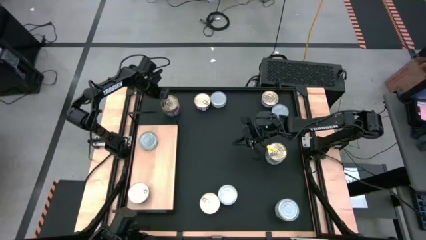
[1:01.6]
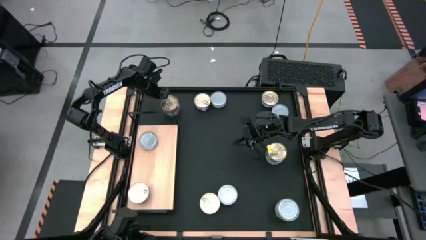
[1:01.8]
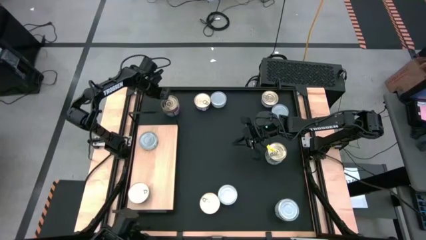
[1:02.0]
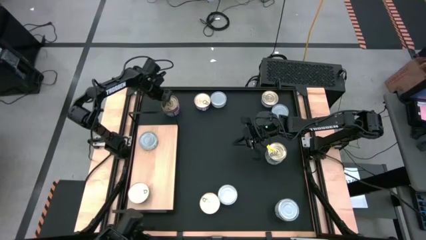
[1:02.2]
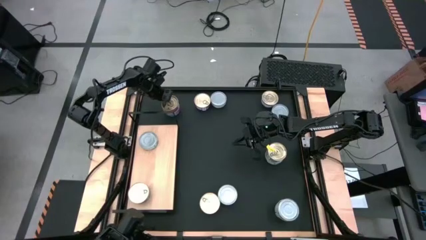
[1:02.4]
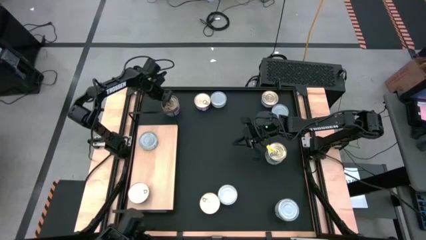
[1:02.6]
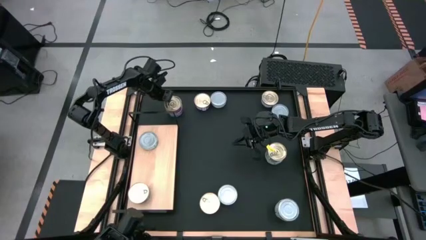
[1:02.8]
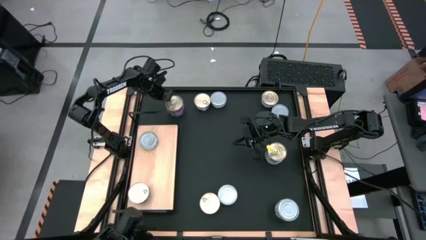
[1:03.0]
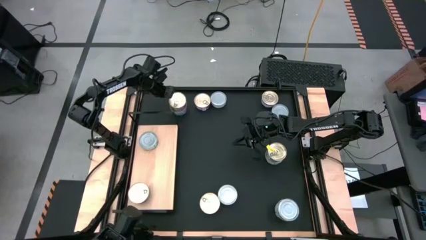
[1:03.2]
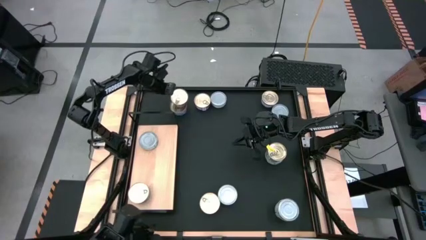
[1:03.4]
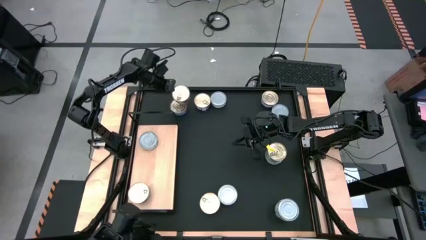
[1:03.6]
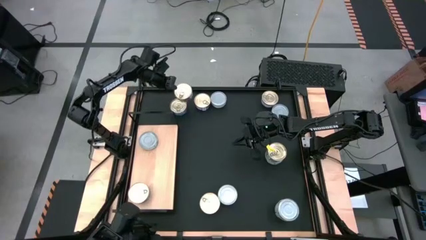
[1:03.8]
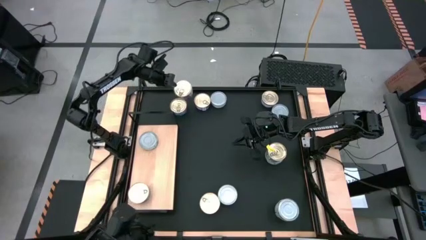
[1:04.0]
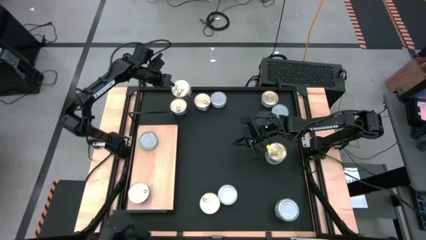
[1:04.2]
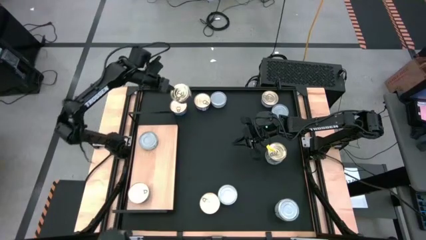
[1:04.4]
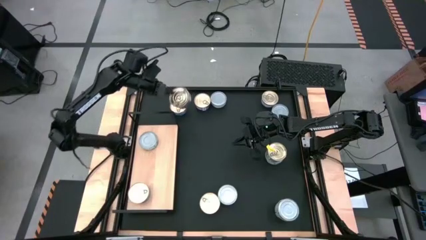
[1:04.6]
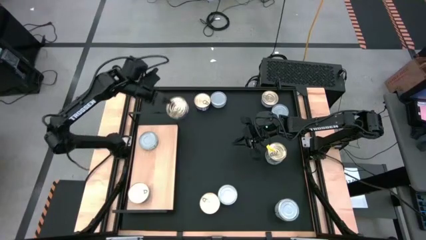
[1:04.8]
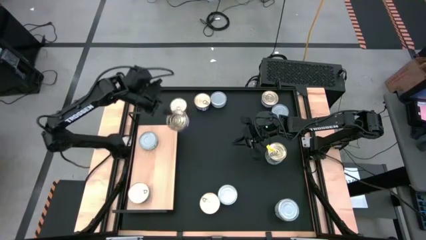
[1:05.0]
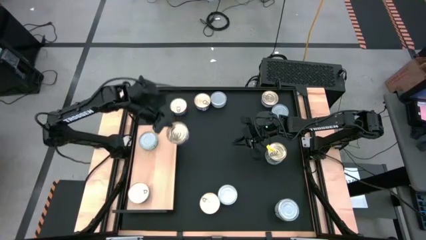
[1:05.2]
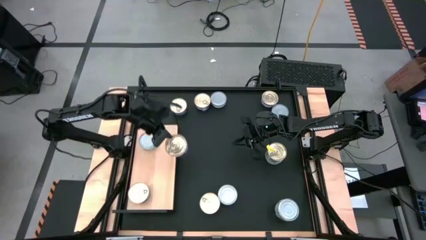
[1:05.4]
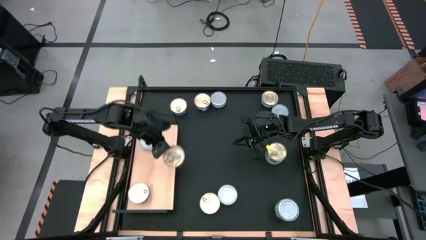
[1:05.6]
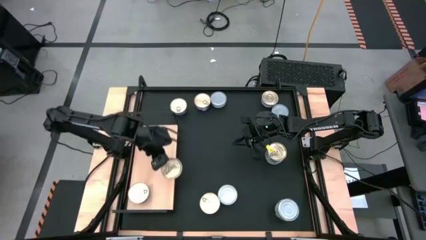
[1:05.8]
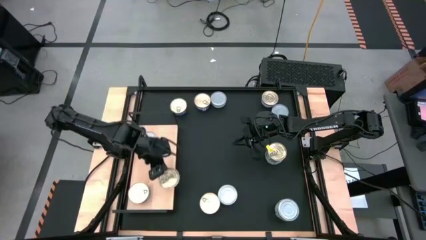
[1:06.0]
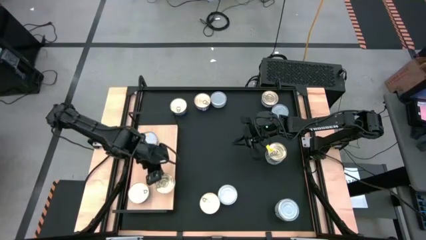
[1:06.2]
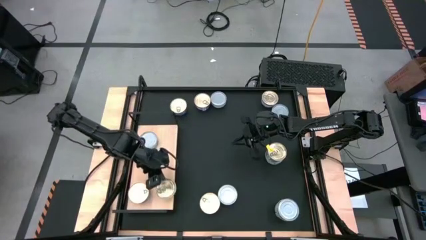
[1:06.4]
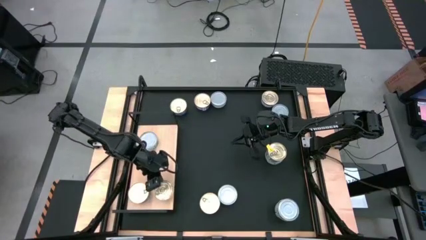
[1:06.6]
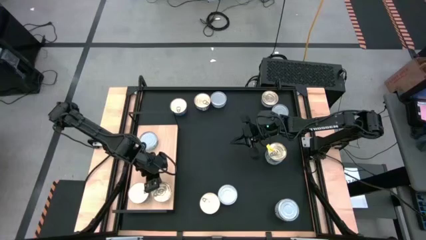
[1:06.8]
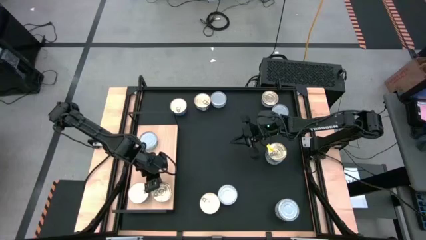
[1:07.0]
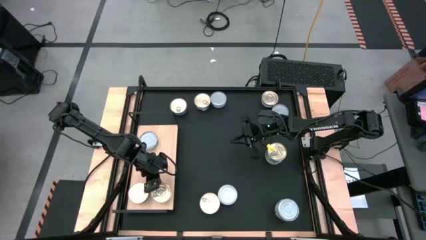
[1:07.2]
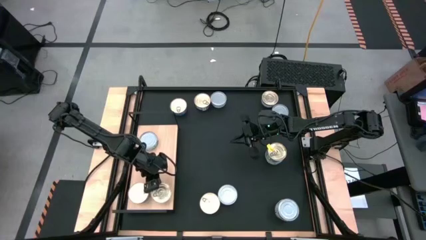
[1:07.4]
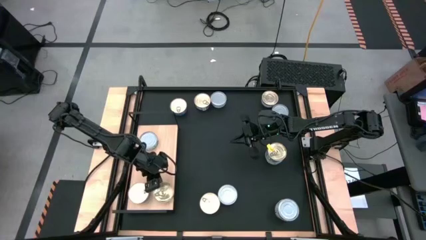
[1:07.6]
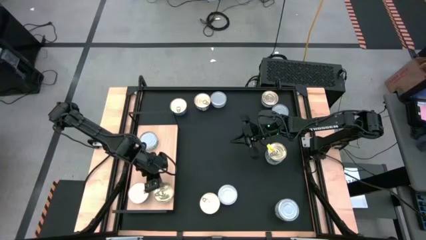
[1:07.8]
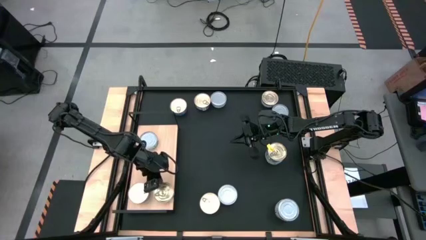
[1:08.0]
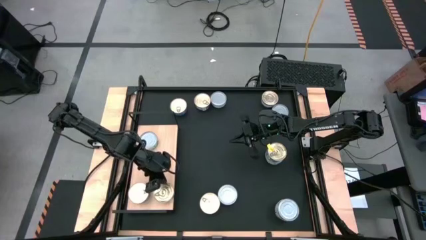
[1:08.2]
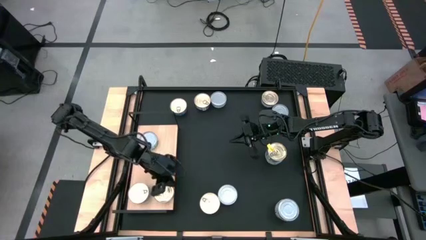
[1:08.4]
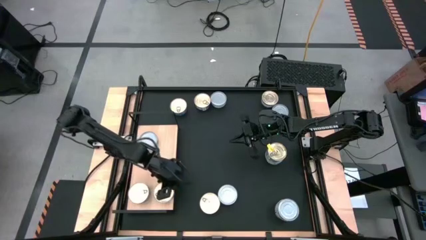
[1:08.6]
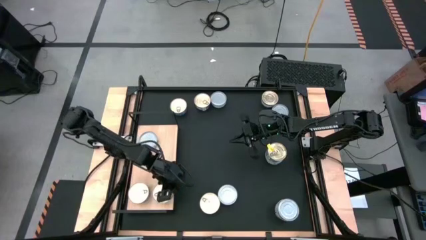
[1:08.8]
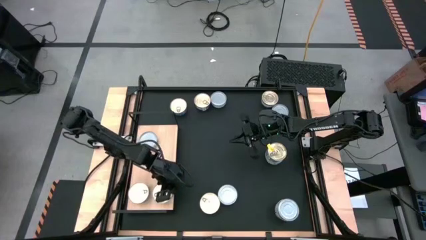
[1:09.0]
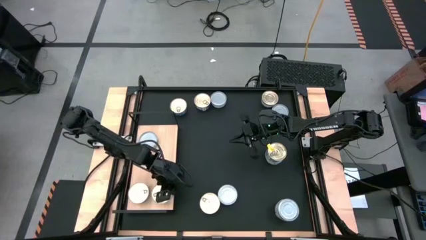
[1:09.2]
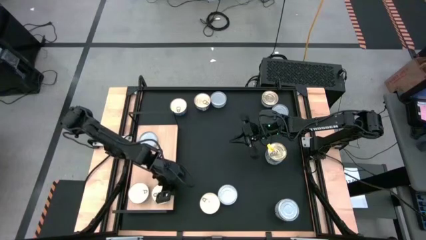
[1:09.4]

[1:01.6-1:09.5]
Task: Stack canned seafood by type on shelf
Put the blue tuna can on the shelf

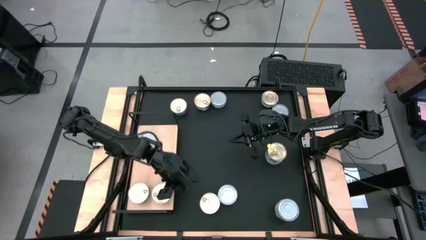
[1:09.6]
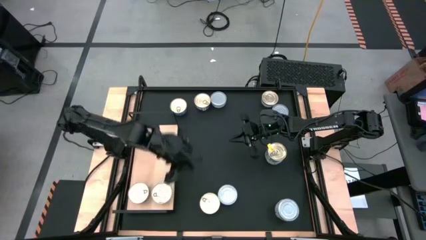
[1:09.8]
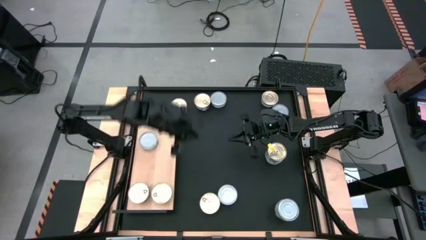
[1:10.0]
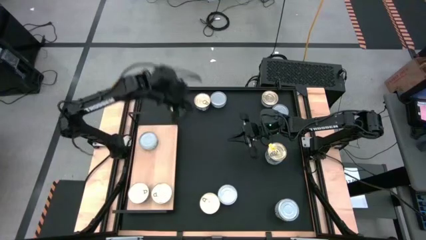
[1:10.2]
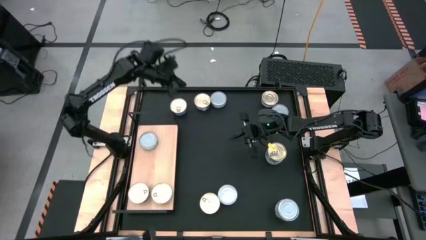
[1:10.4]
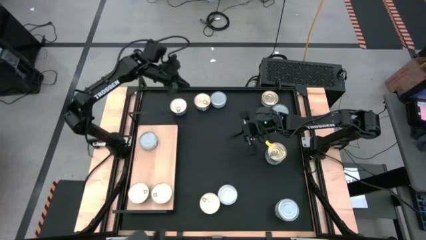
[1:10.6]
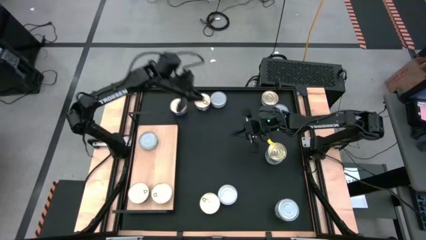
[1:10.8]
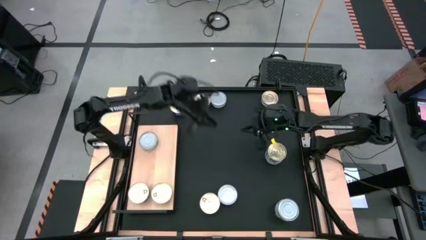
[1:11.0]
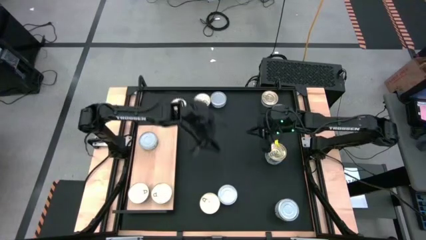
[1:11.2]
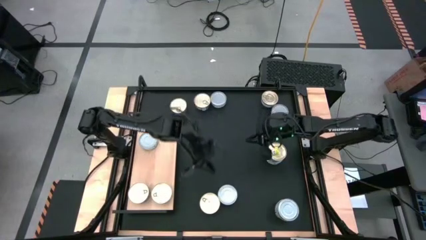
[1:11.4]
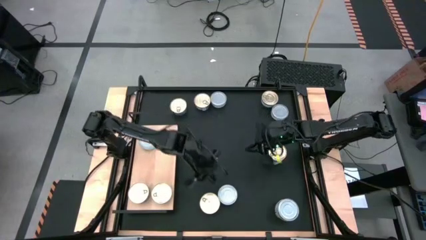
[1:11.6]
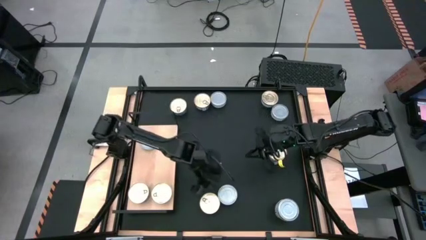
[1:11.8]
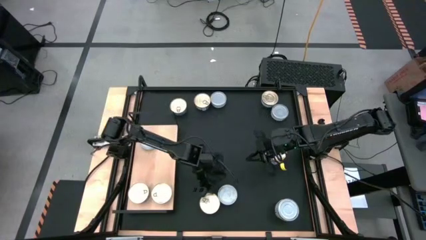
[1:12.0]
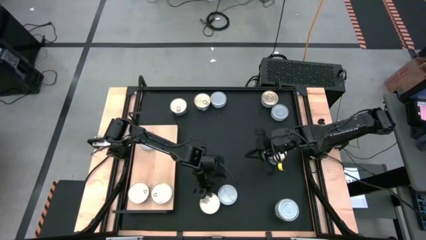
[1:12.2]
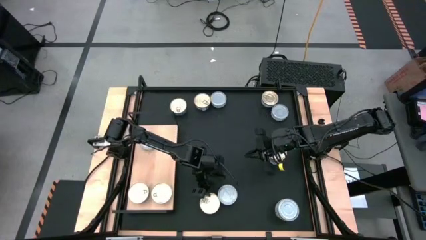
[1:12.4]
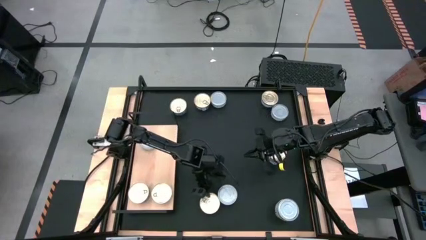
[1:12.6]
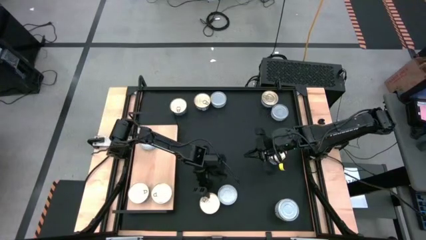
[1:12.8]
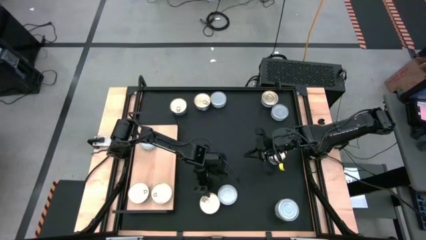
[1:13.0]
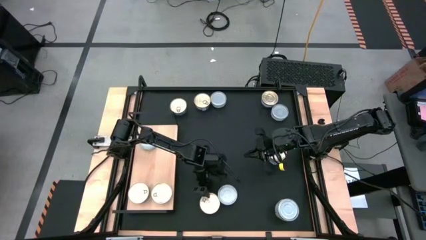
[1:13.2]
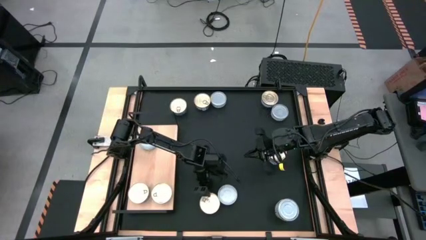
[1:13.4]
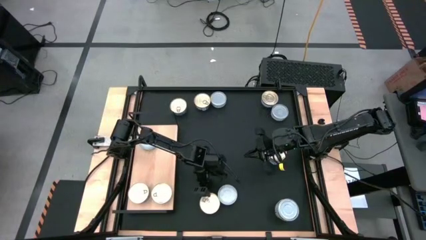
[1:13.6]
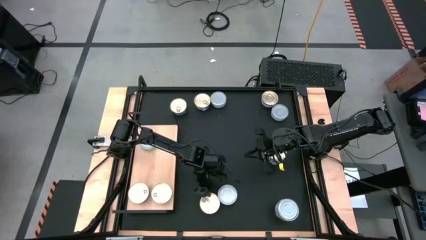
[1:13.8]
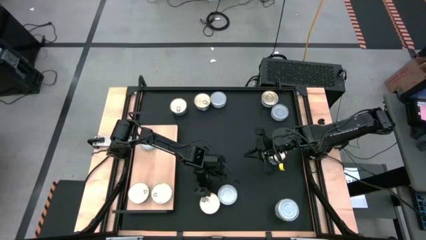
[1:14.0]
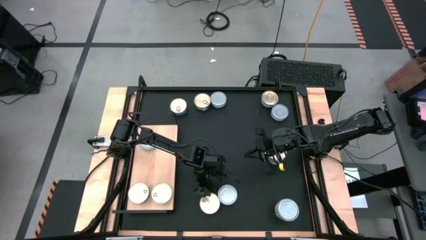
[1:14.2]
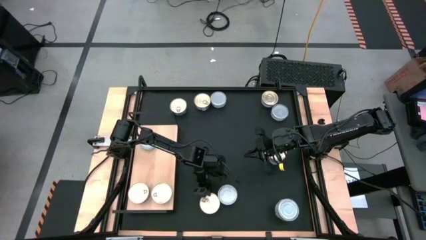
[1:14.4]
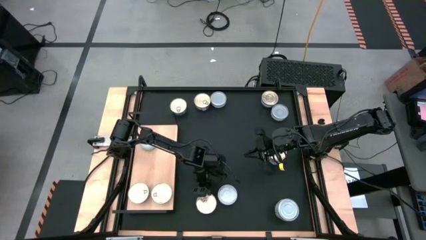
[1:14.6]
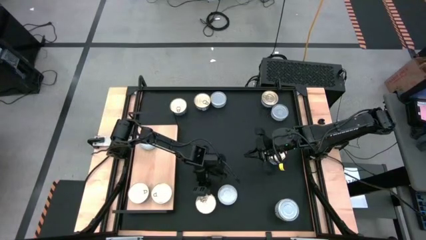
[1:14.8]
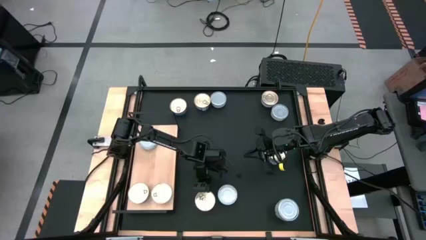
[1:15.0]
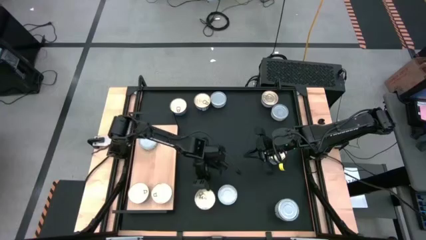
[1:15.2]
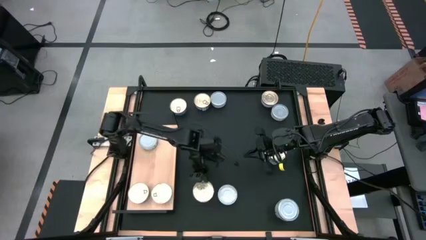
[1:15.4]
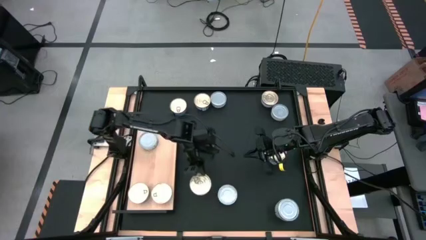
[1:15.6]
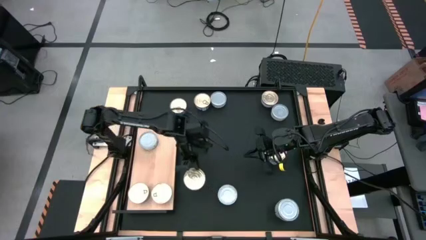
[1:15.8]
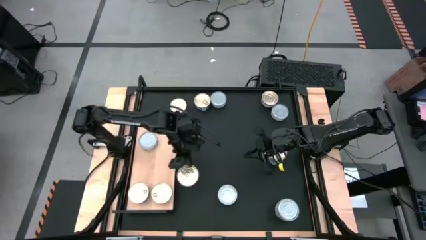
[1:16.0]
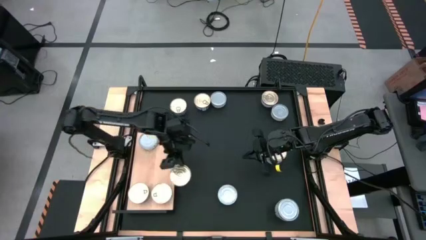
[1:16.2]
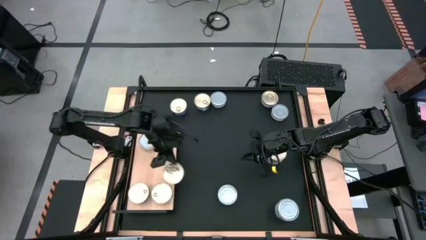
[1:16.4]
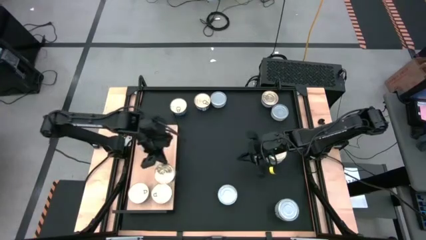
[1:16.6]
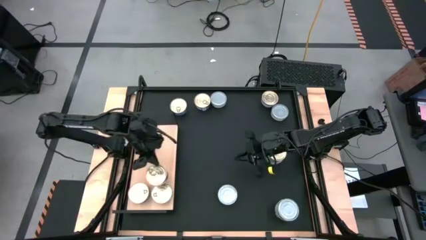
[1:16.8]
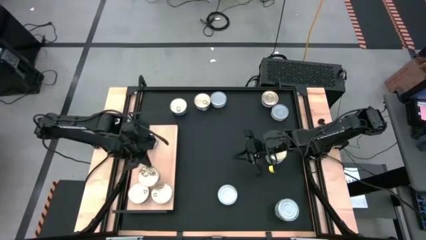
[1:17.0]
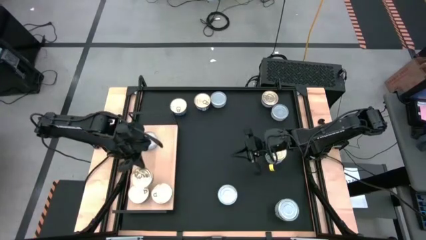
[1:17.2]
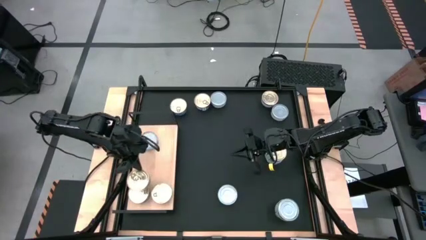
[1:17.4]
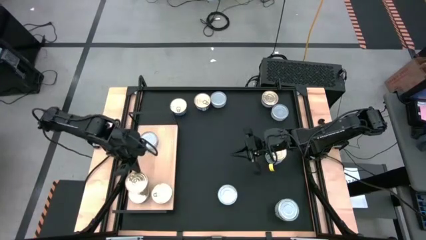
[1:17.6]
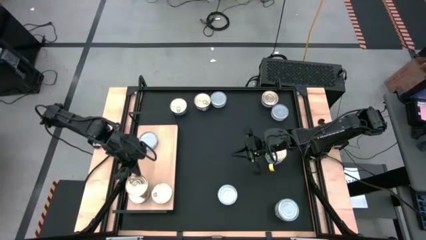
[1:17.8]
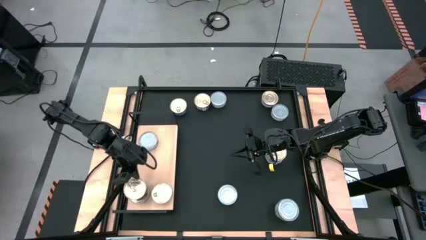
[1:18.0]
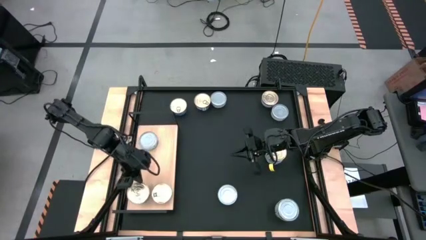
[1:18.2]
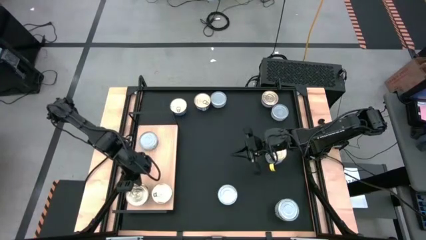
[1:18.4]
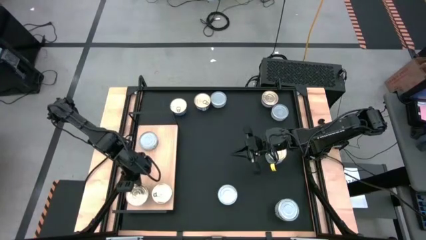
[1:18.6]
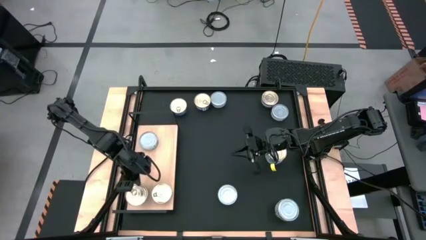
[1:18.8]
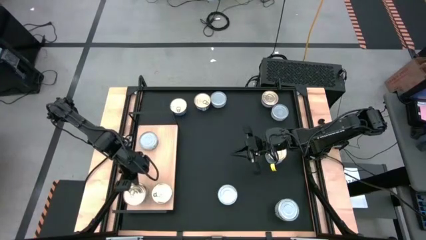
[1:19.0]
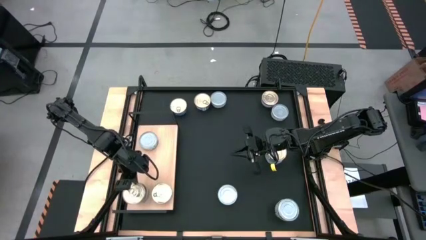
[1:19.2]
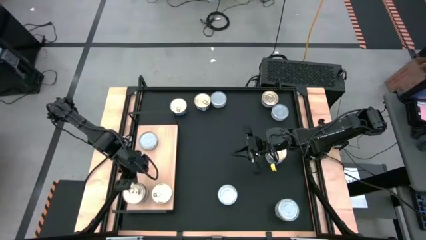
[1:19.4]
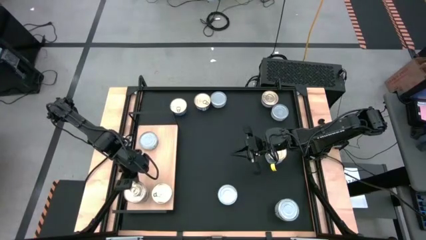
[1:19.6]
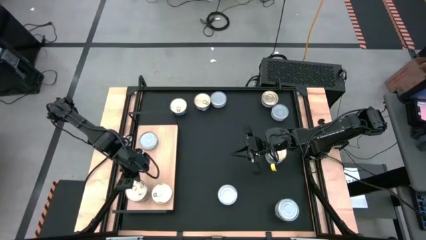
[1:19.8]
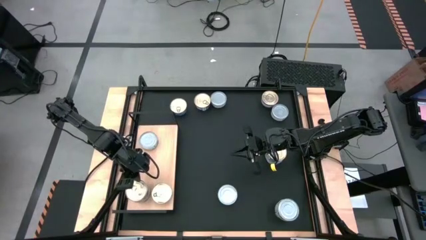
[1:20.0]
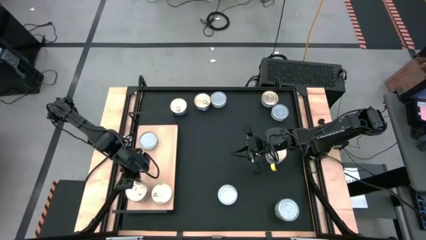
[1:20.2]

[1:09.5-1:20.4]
Stack the blue tuna can on top of the blue tuna can on the shelf
